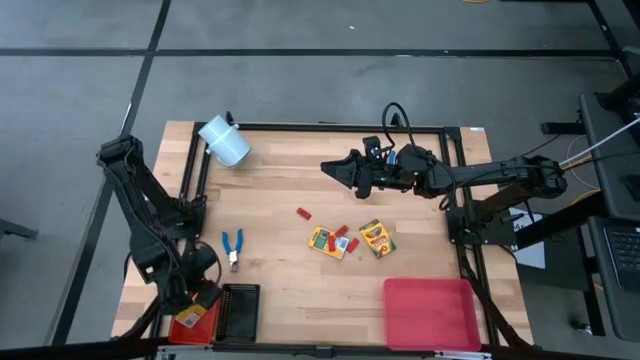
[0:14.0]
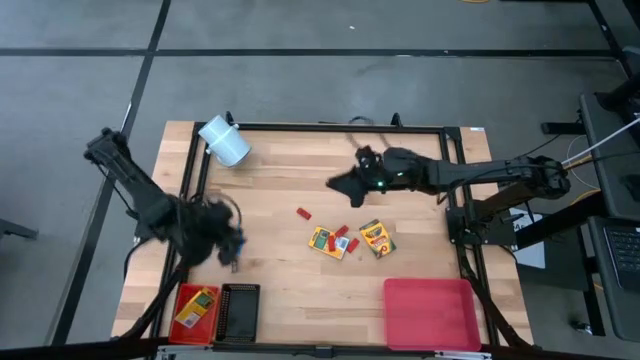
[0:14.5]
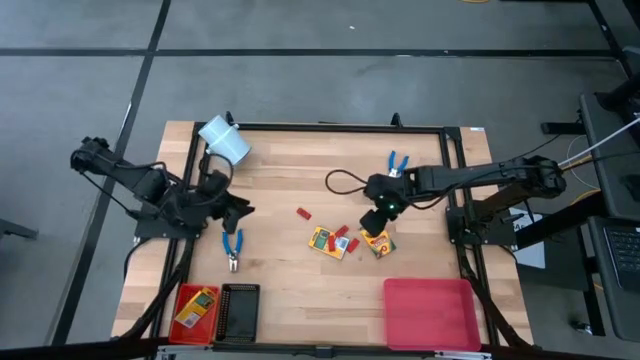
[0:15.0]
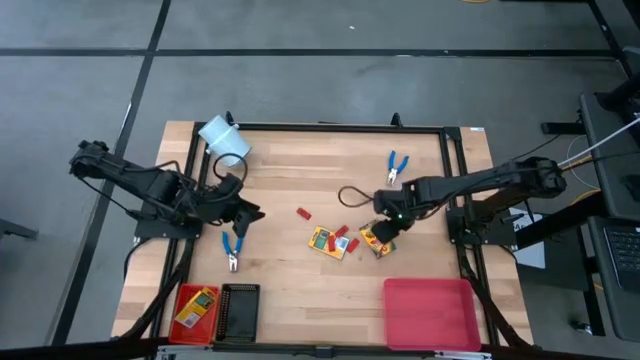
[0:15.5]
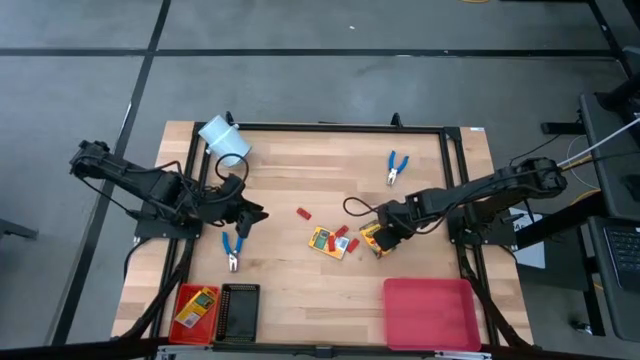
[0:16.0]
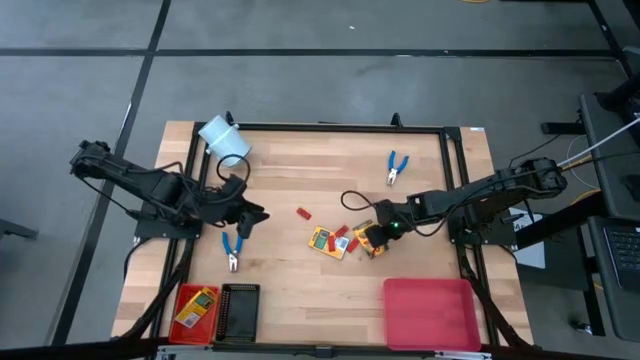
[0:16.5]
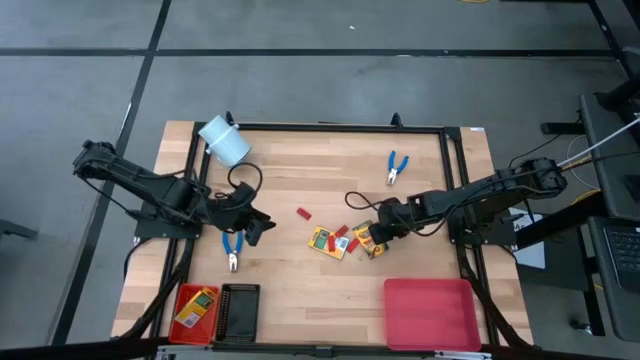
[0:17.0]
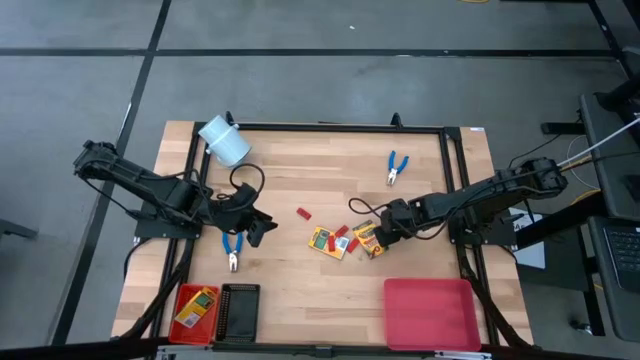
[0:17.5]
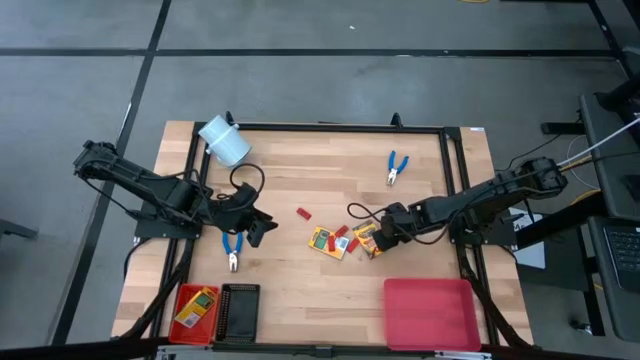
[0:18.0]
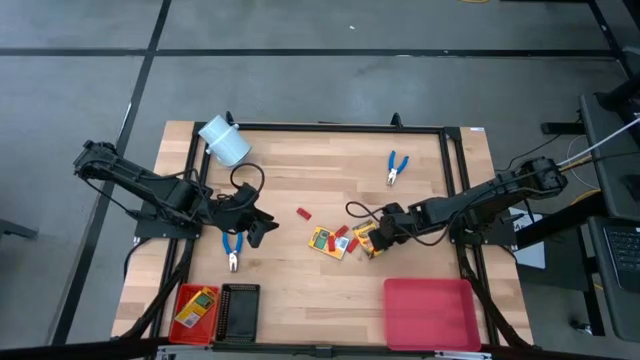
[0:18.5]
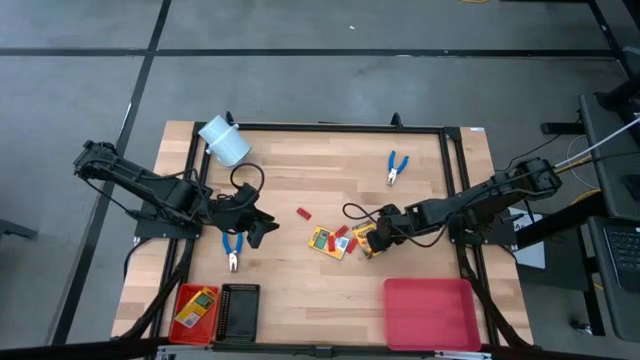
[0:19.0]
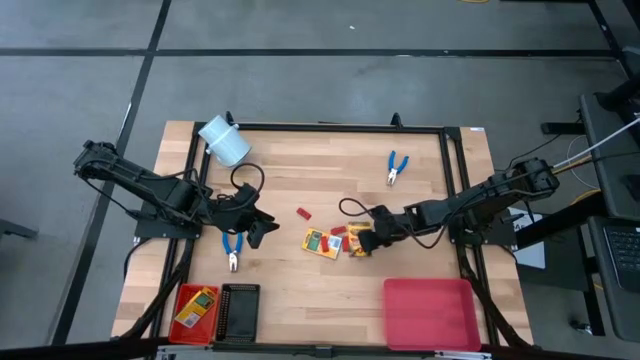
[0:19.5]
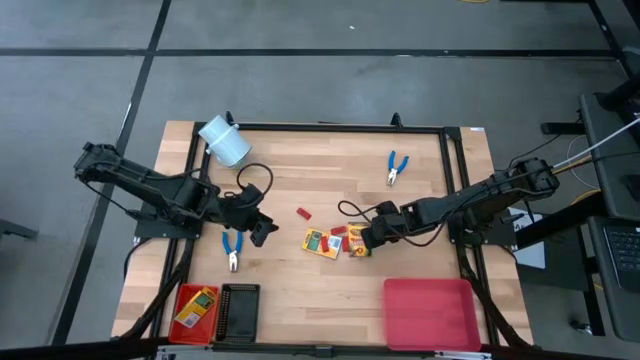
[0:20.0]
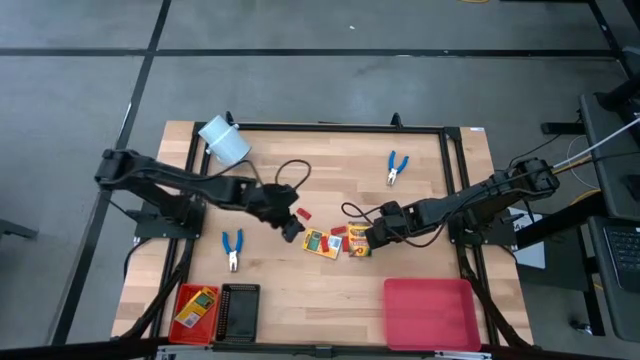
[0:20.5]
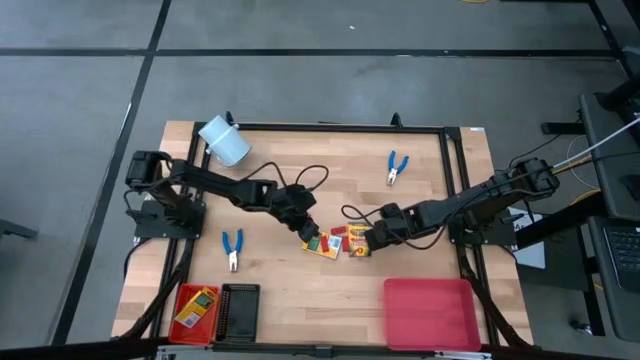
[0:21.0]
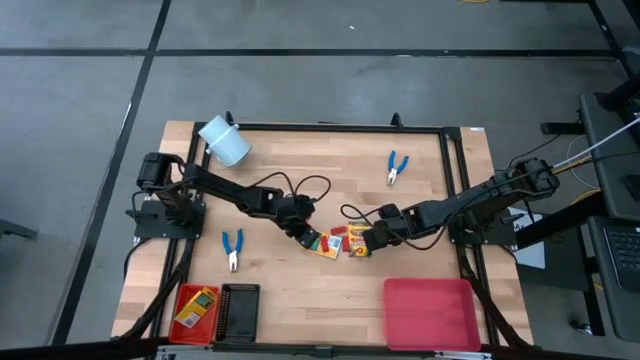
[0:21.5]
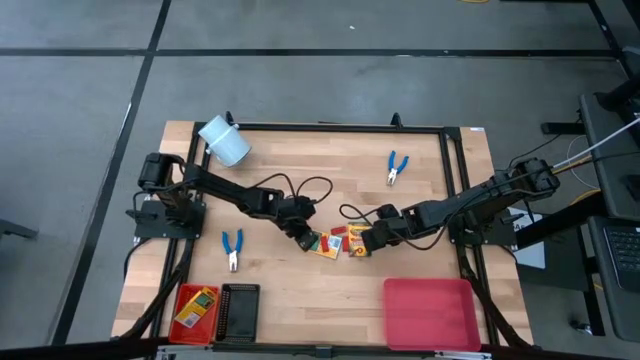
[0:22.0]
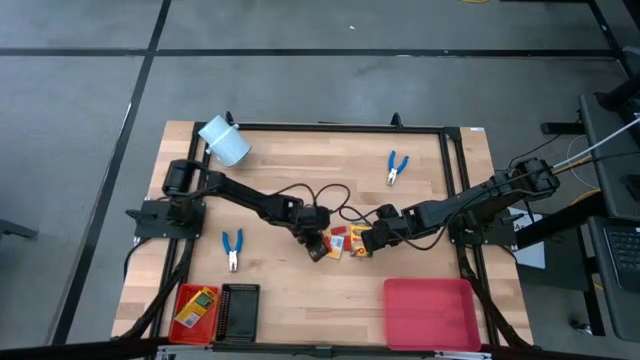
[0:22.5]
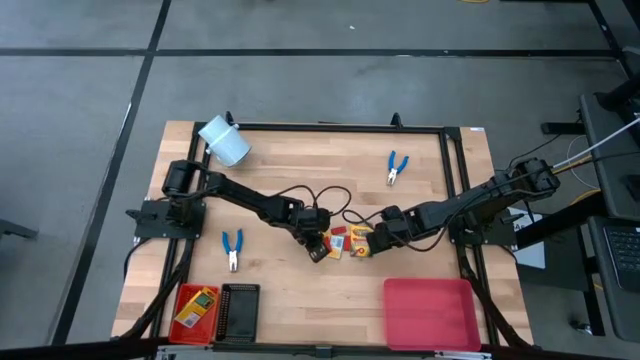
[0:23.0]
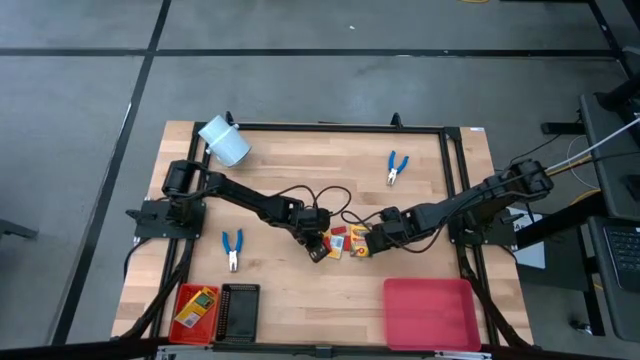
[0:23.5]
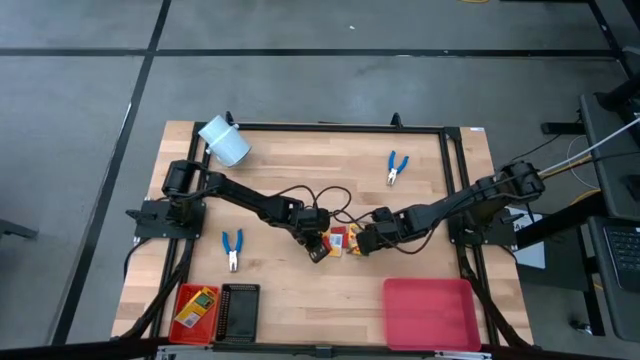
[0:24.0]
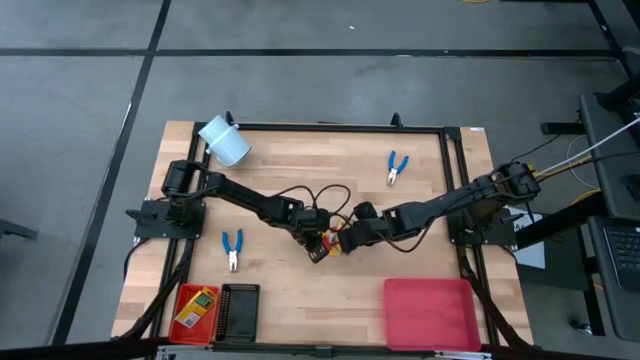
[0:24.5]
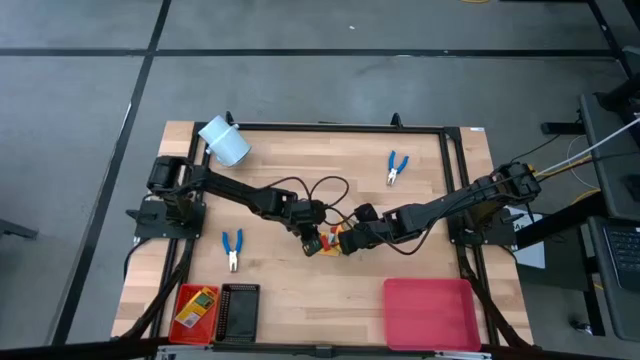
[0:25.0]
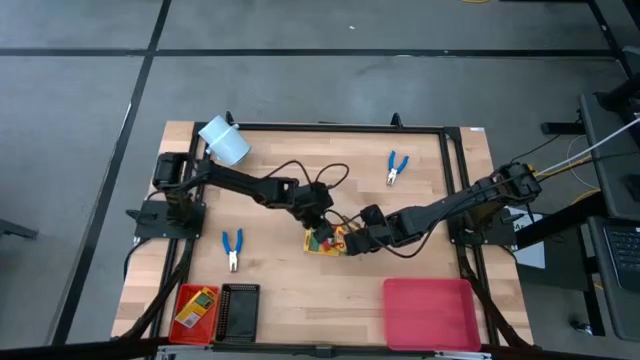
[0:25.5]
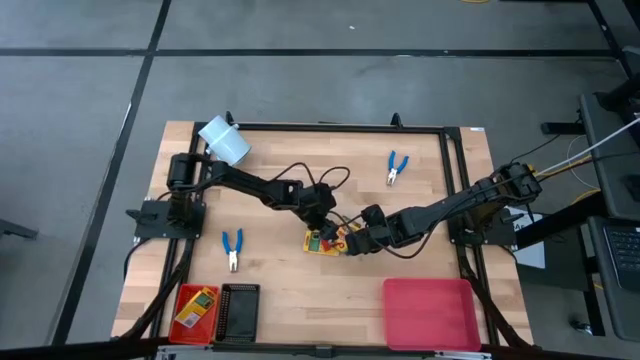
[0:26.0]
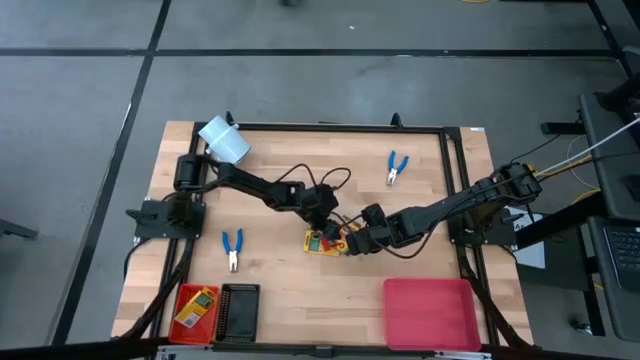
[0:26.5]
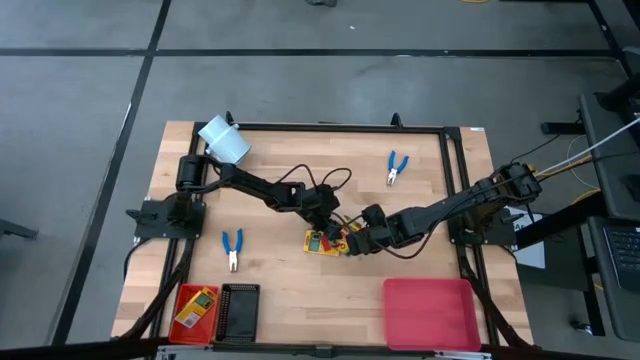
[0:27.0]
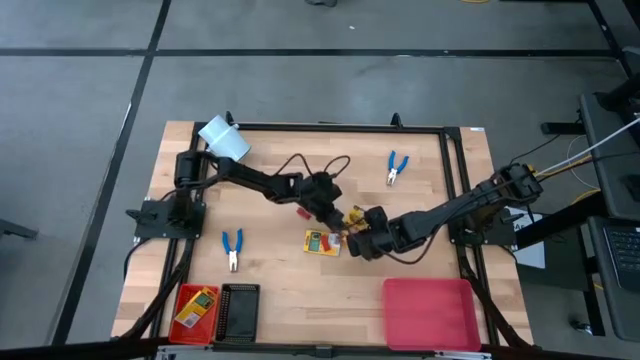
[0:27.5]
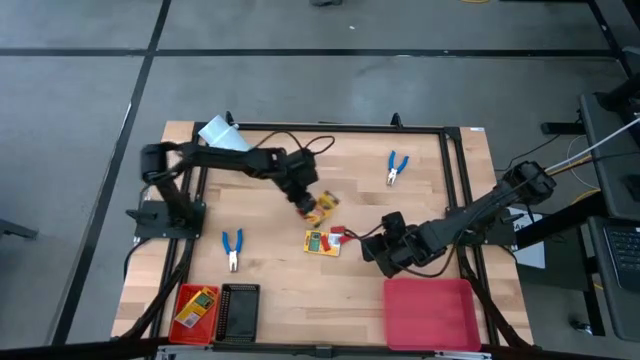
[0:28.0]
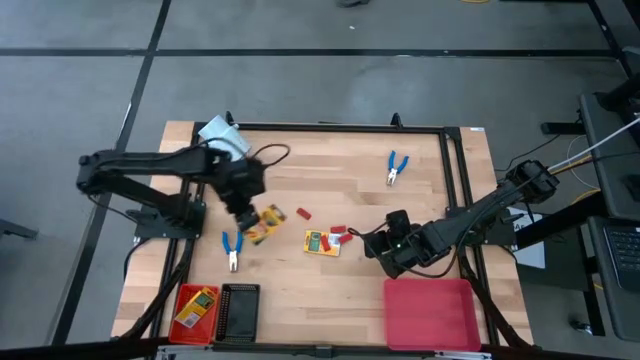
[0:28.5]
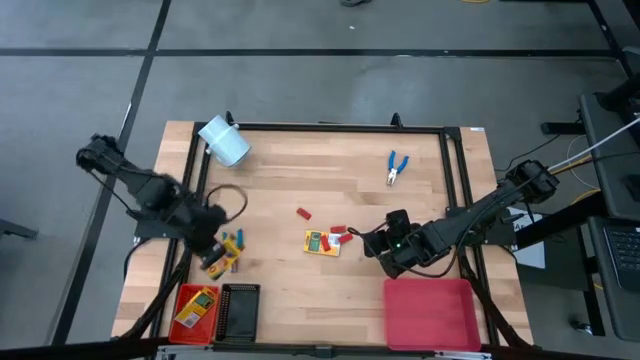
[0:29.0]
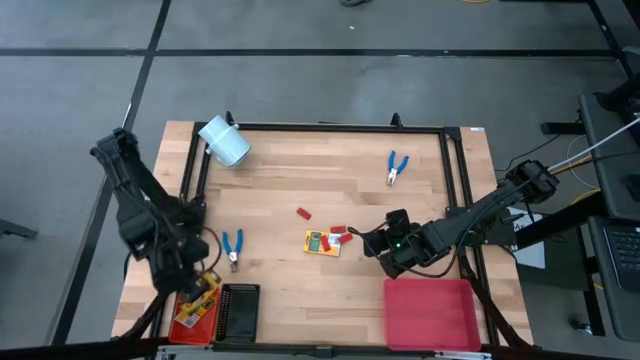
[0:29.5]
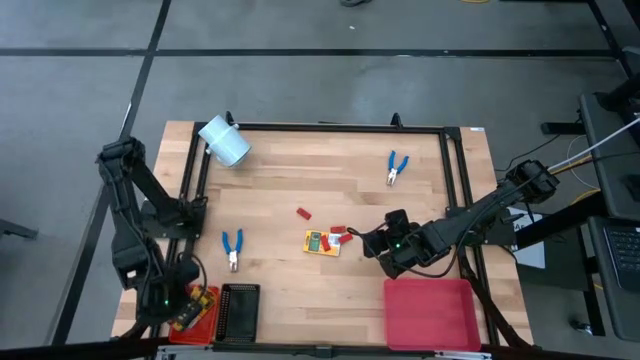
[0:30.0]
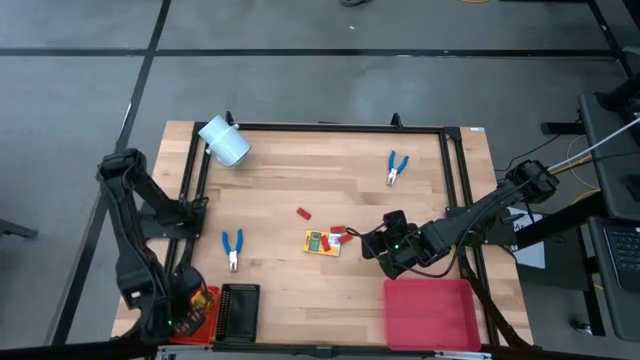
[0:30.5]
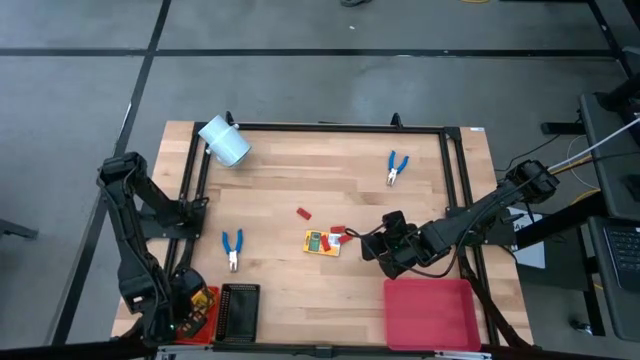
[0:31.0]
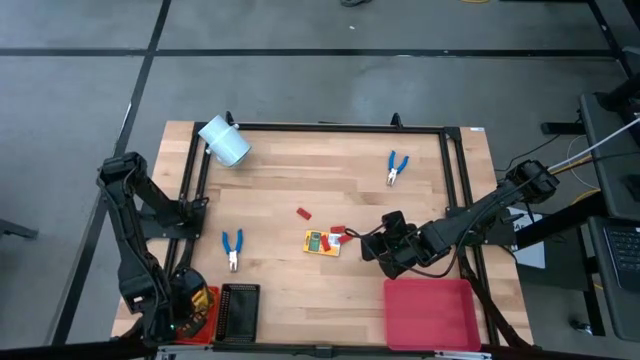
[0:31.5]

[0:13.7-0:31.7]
Task: Pick & Place School Supplies
Put the yellow crayon box into the red basket
